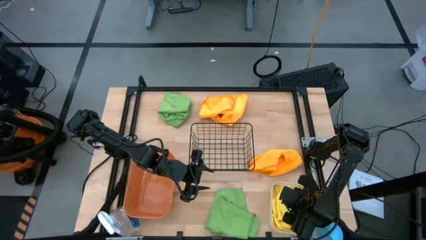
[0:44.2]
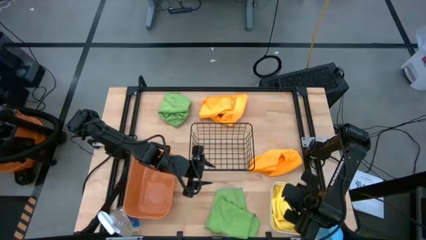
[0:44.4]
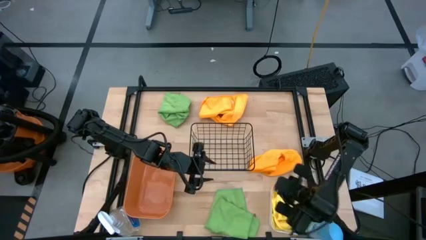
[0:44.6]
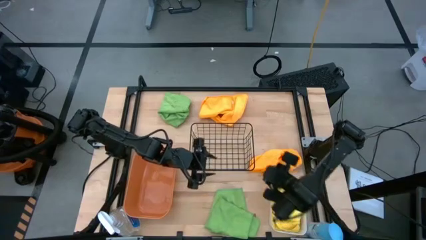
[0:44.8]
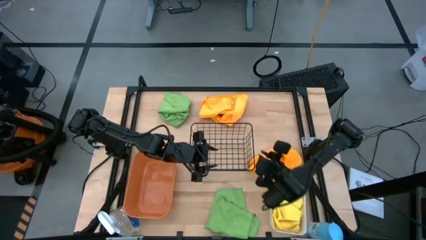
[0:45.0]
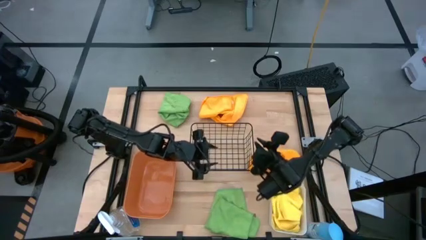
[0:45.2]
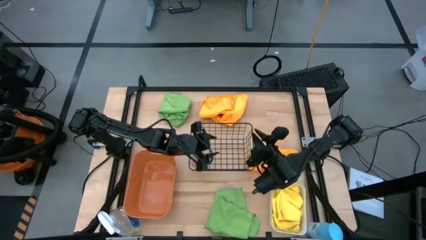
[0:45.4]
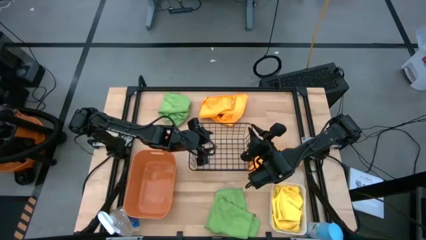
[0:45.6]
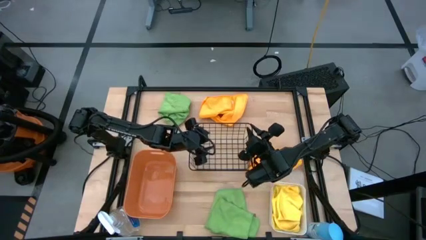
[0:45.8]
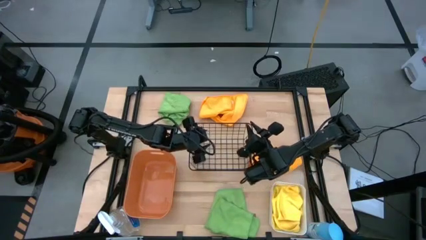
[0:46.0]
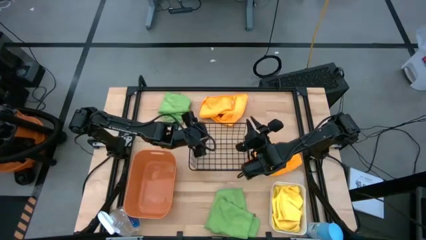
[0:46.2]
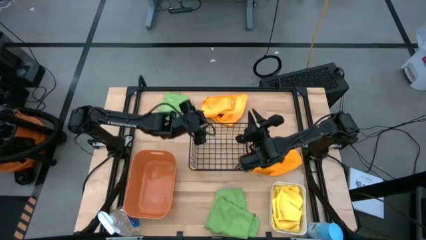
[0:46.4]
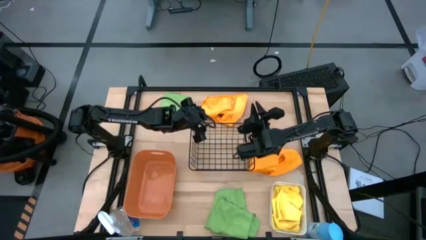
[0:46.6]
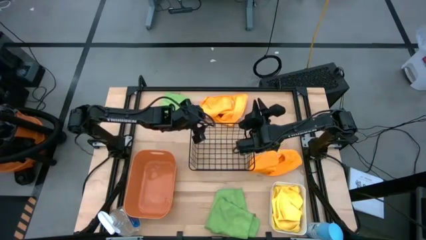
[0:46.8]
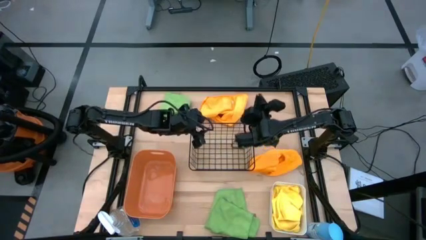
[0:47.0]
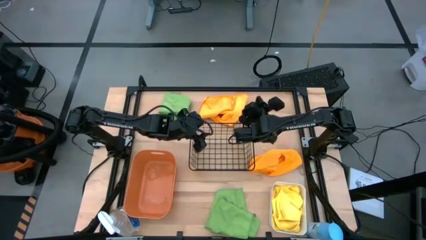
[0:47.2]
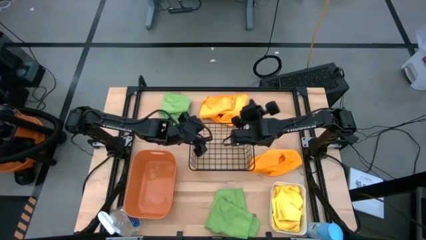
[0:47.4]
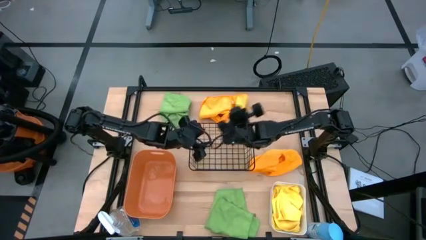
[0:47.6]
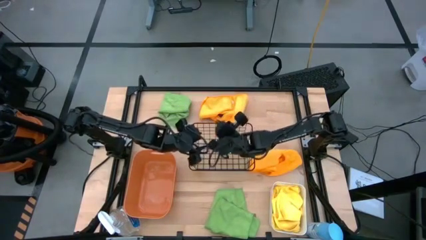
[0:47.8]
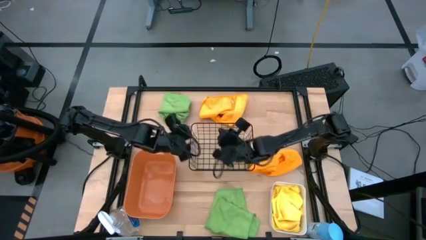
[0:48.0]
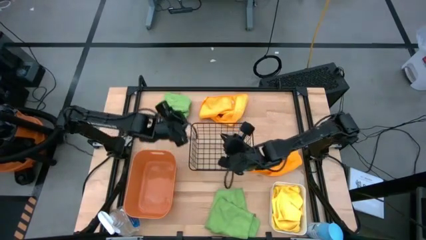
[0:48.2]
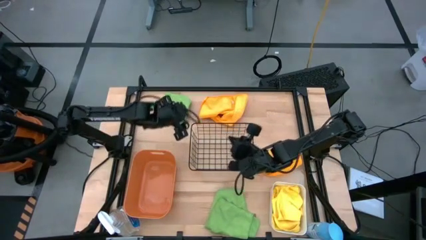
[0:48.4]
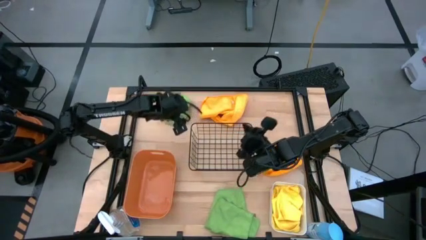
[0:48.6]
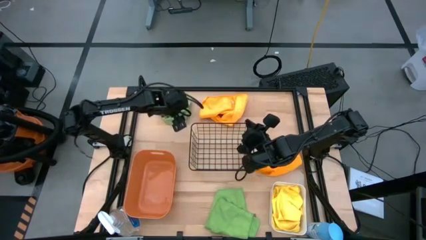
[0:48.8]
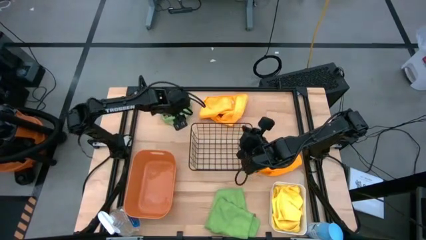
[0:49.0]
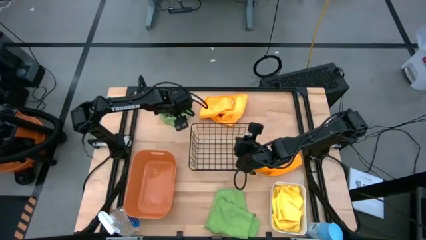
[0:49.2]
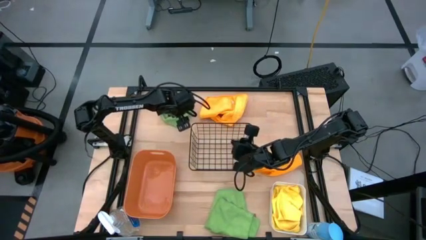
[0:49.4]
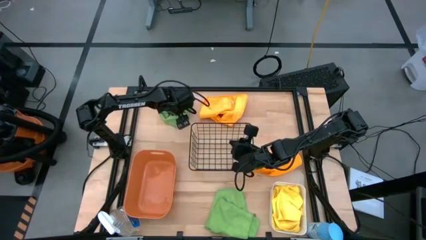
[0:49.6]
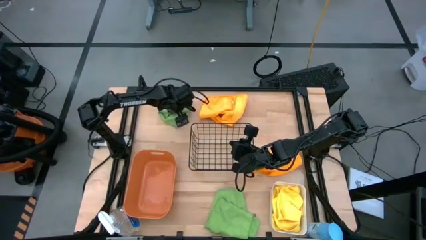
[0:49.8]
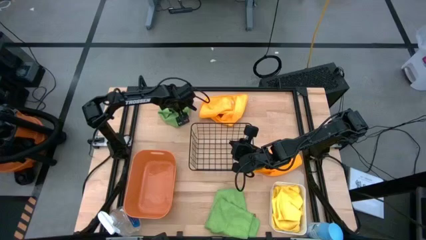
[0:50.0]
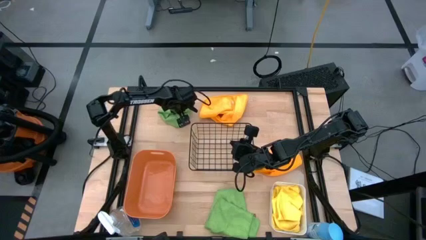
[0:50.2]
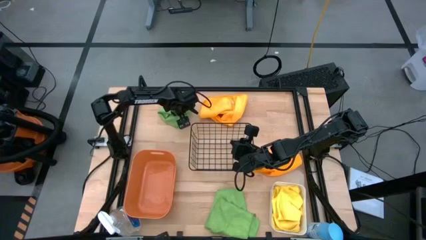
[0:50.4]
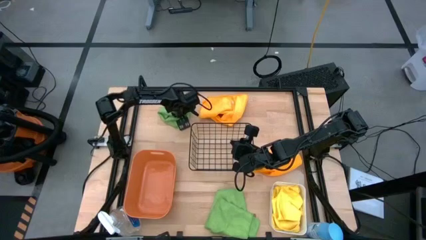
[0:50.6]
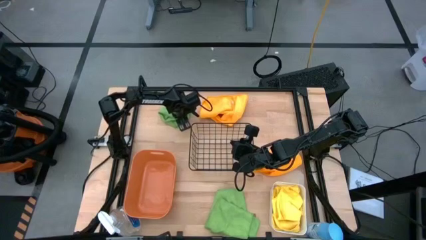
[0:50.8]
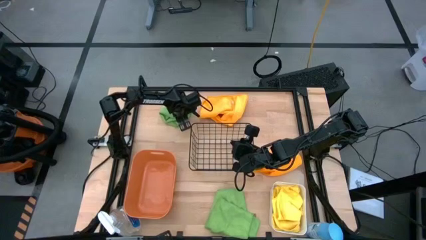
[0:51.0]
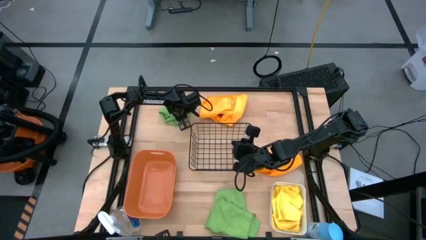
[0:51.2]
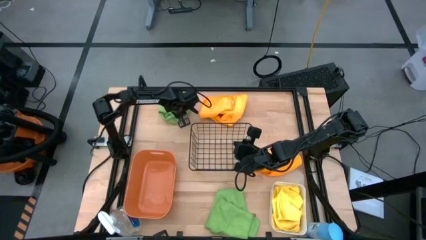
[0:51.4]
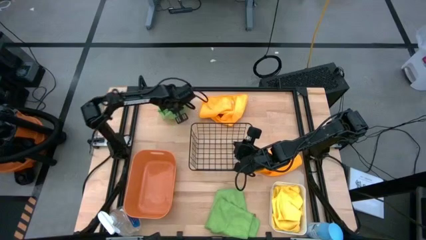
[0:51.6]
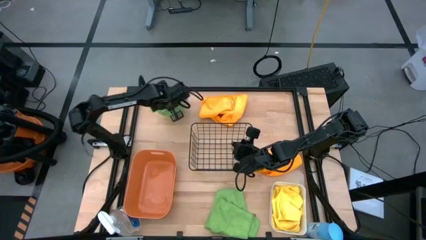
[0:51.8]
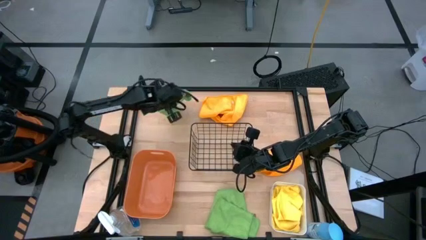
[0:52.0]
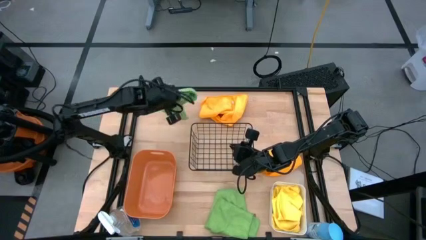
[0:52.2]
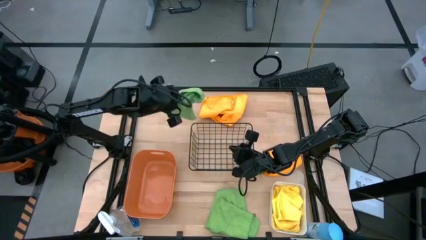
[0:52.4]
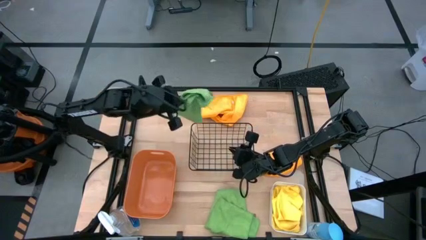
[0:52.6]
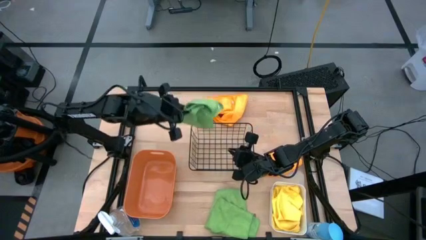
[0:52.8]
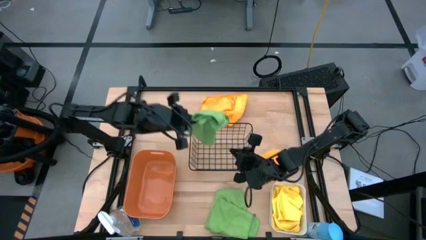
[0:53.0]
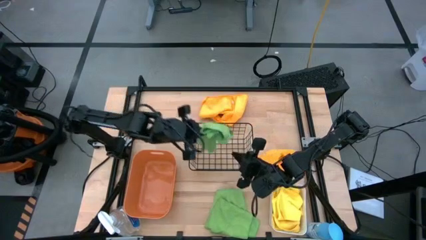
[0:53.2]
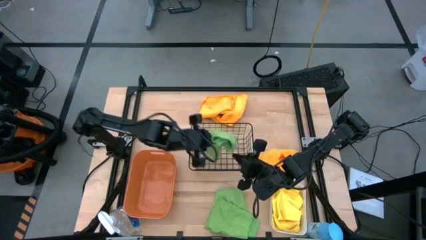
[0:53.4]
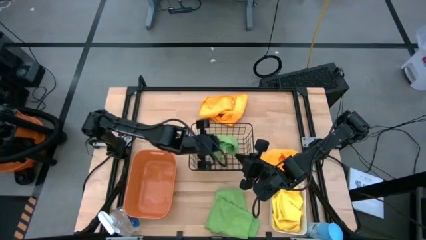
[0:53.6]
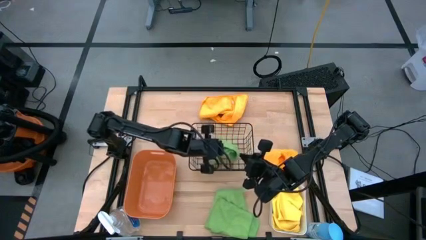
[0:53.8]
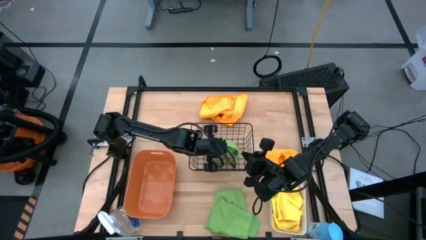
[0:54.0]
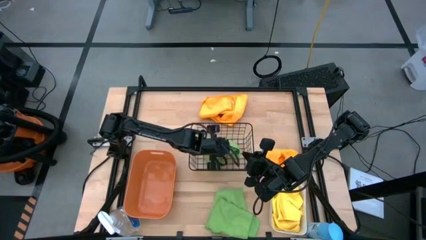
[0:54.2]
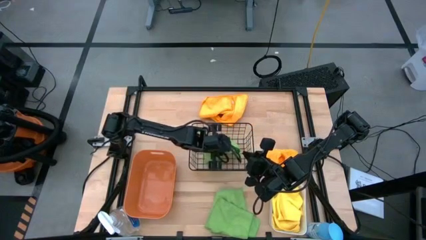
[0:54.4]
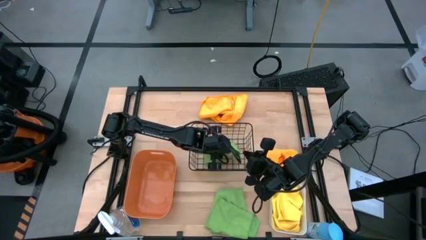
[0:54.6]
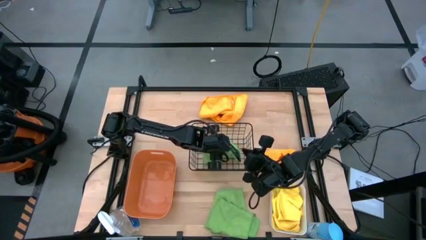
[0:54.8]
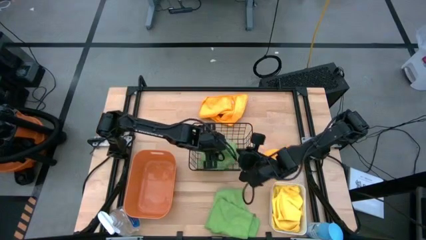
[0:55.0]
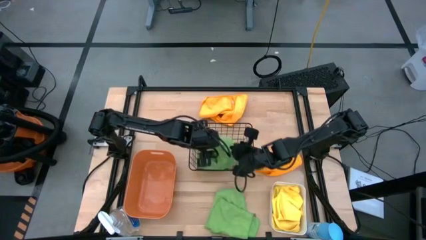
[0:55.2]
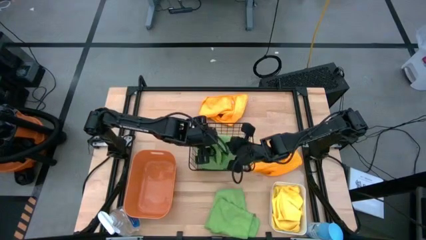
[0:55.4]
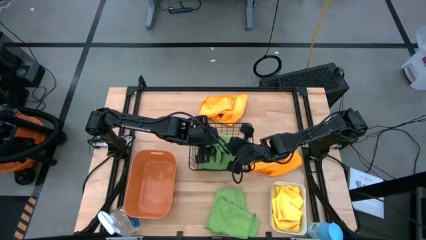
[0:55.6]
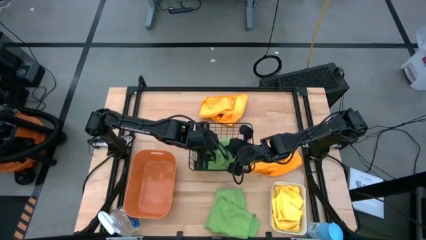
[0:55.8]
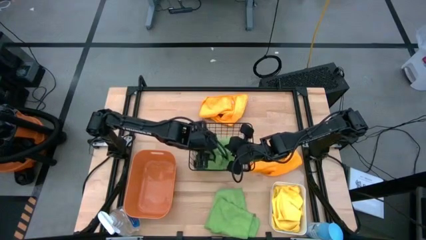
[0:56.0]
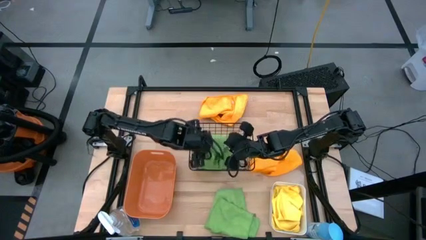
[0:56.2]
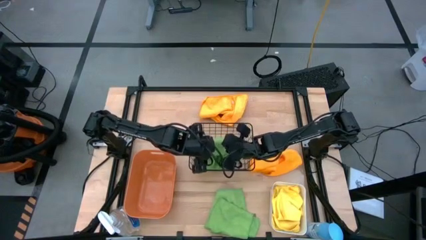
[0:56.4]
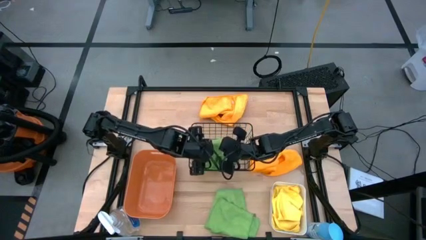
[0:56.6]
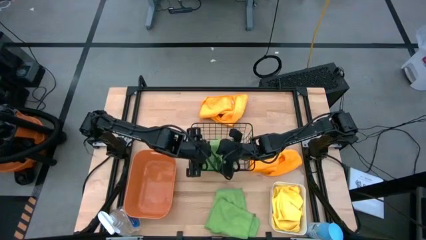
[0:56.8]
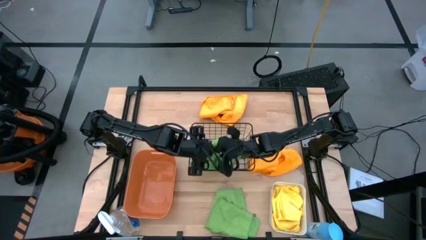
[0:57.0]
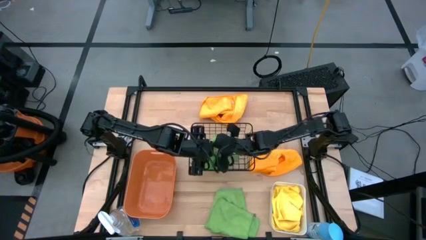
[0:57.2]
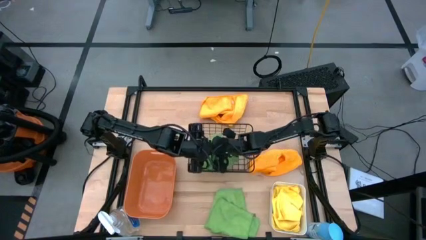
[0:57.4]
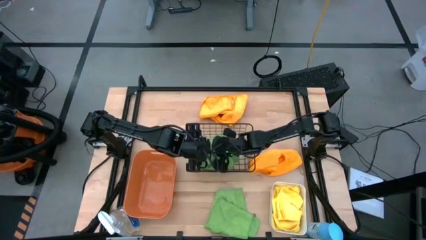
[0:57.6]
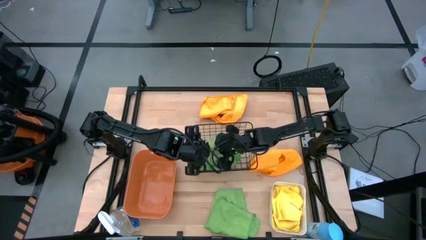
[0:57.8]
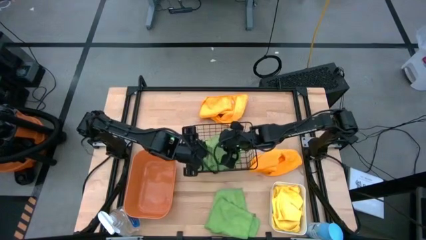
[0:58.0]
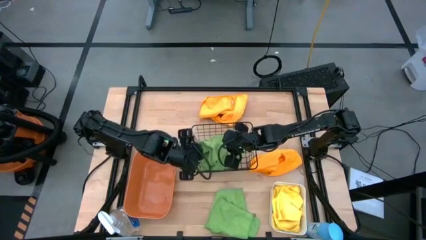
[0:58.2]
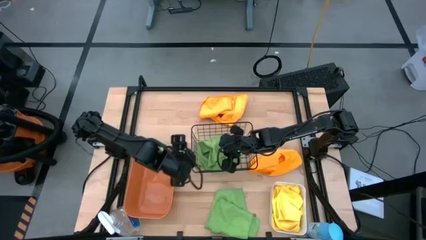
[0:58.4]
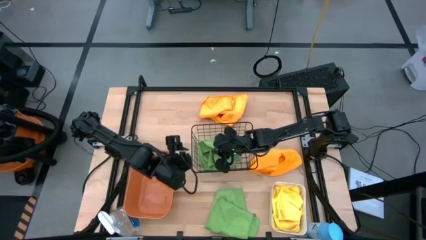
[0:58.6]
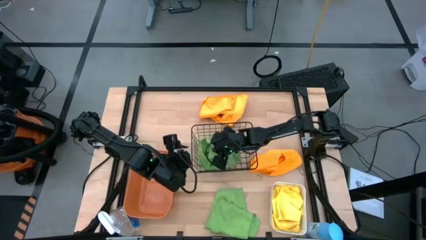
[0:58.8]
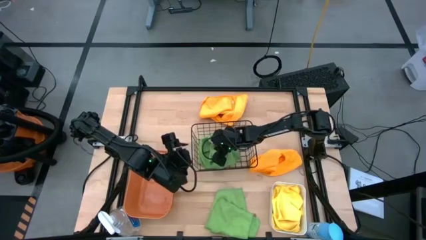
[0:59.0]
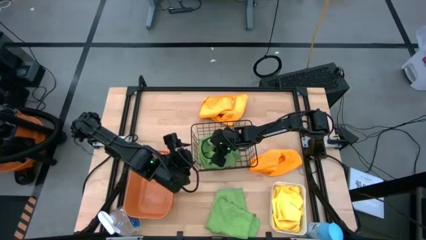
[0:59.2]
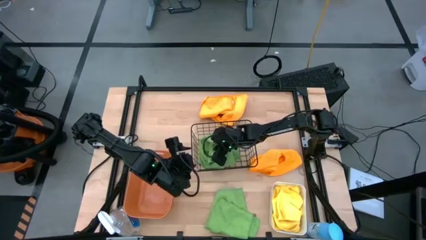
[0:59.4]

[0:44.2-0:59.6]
Task: Sort microfiber towel by color & place in baskets
Put the top green microfiber cloth into the black wire basket

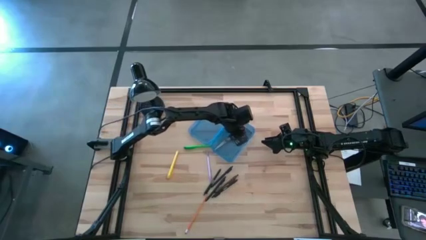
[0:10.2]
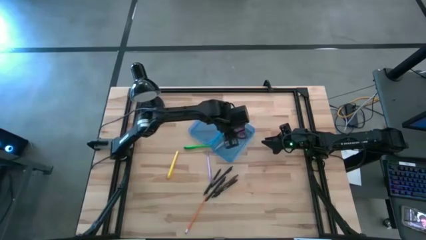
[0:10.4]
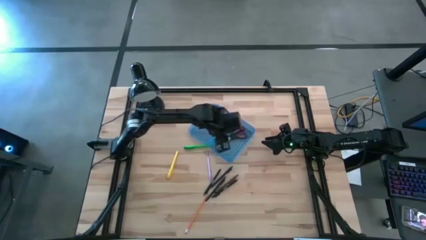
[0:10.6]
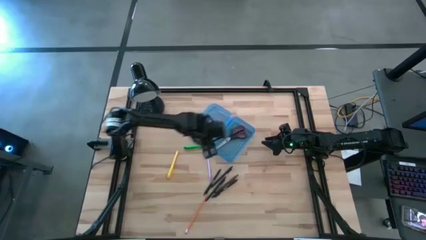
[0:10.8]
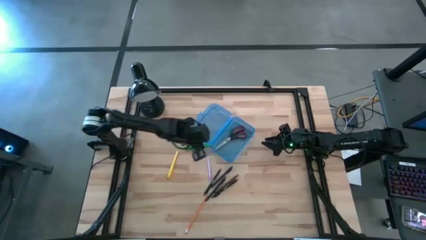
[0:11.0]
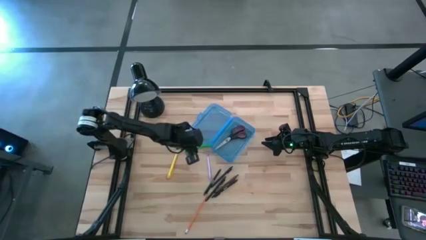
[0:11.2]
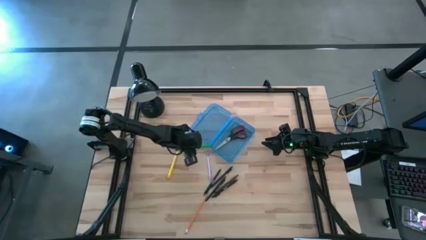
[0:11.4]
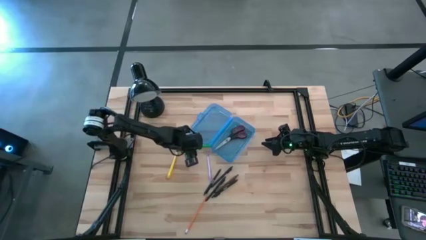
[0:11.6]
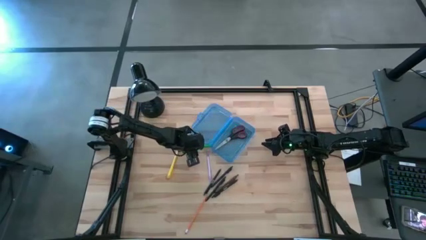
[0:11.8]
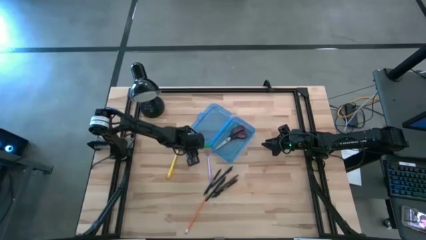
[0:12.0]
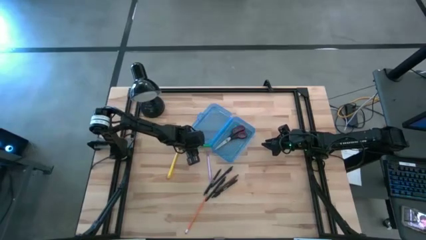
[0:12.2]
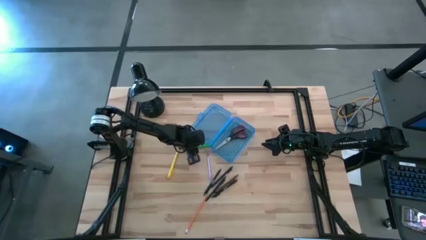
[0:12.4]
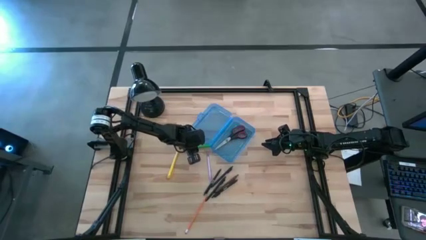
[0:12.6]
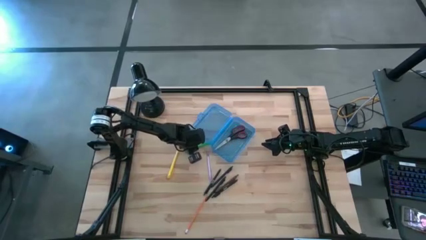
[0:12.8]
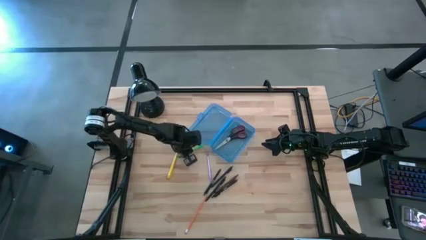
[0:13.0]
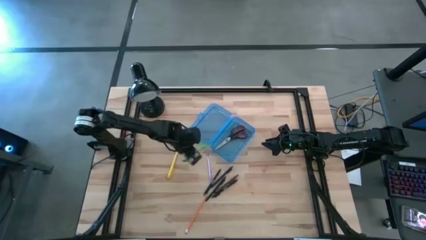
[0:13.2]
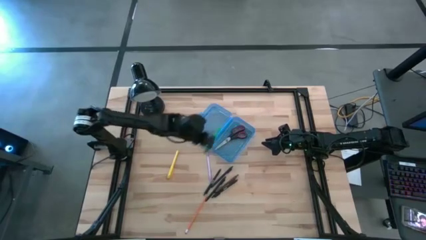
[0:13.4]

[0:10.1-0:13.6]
Task: Pick & place school supplies into a supply box
Put the pen green into the supply box
